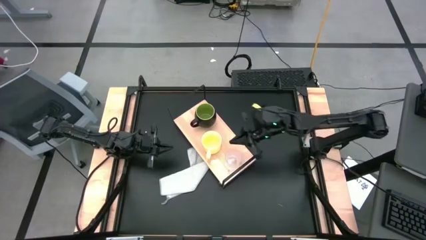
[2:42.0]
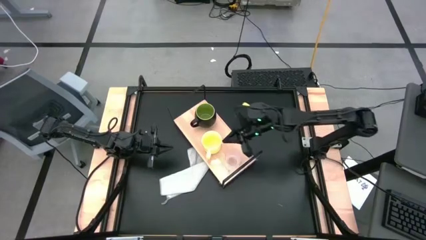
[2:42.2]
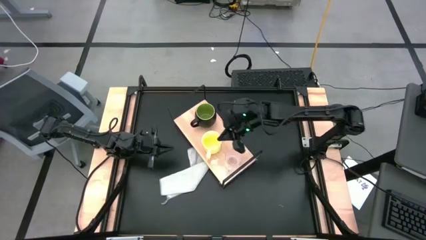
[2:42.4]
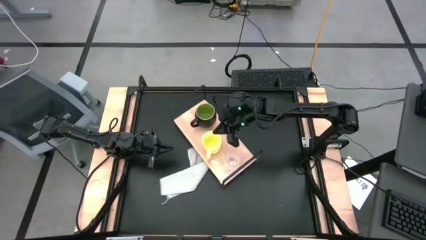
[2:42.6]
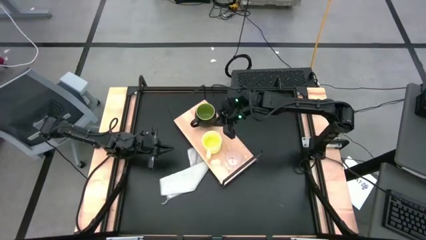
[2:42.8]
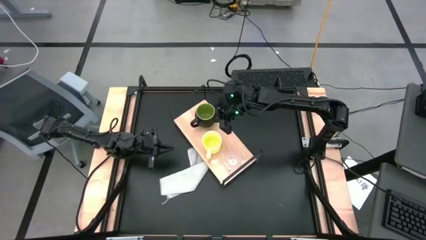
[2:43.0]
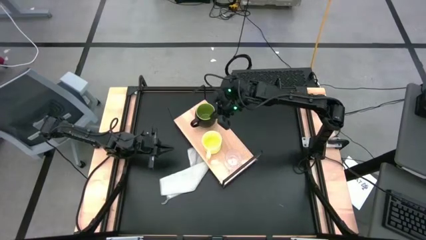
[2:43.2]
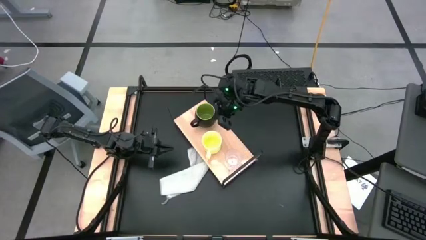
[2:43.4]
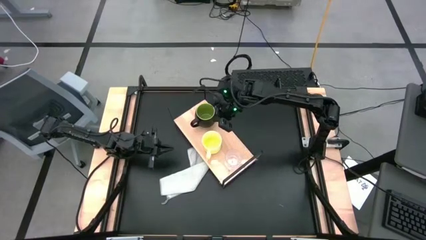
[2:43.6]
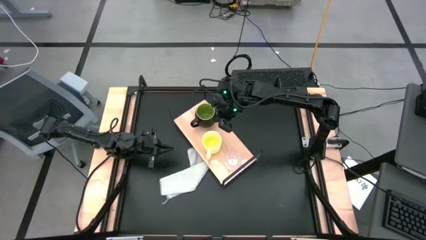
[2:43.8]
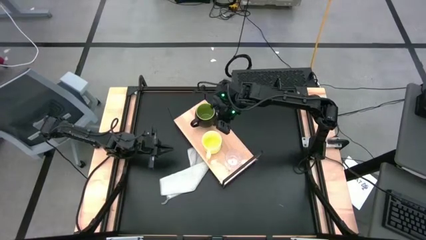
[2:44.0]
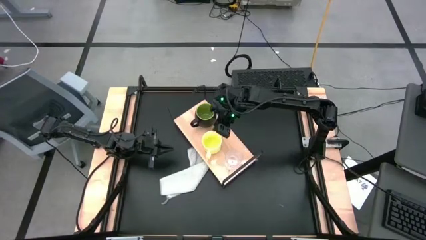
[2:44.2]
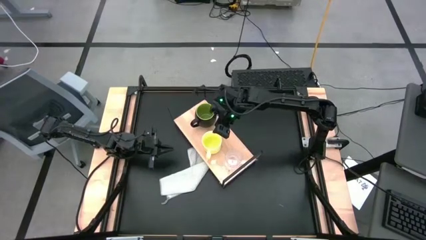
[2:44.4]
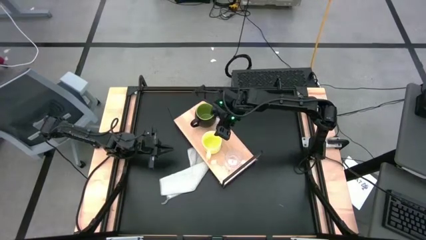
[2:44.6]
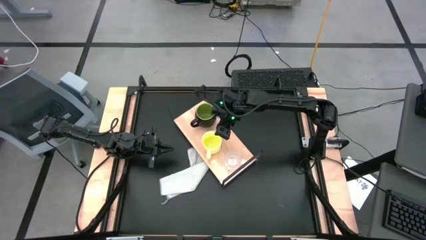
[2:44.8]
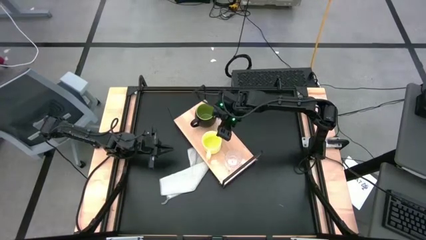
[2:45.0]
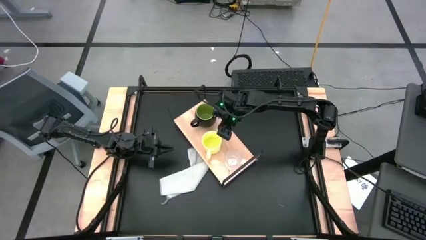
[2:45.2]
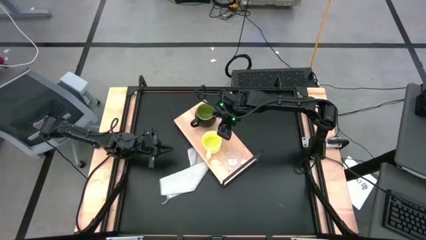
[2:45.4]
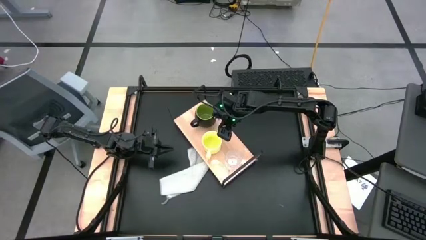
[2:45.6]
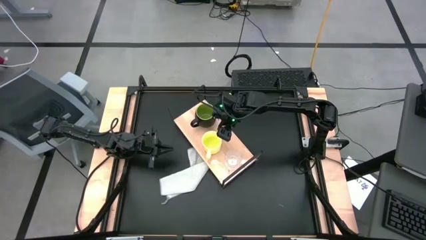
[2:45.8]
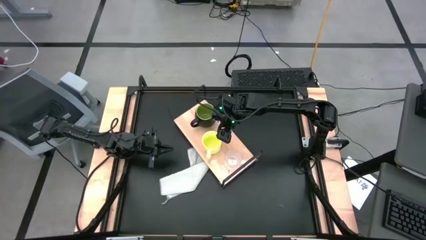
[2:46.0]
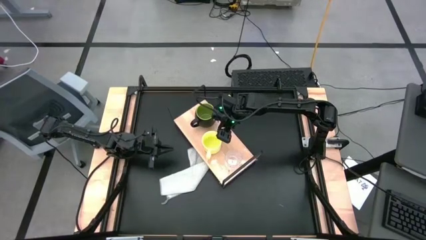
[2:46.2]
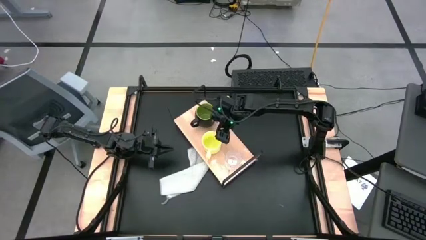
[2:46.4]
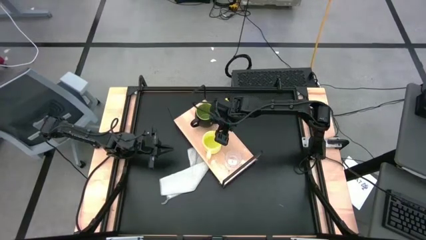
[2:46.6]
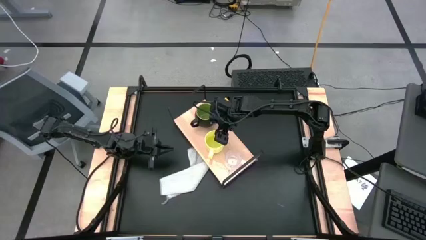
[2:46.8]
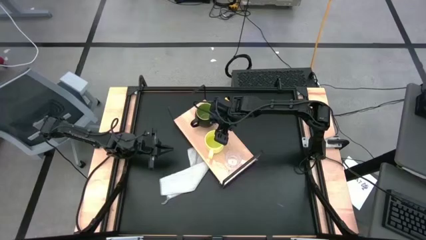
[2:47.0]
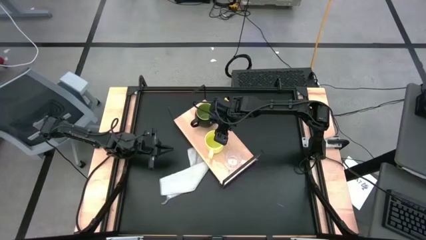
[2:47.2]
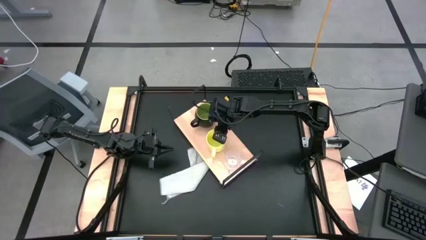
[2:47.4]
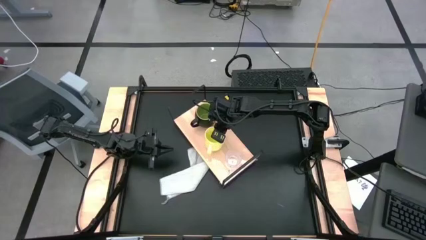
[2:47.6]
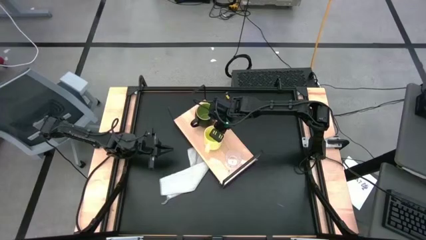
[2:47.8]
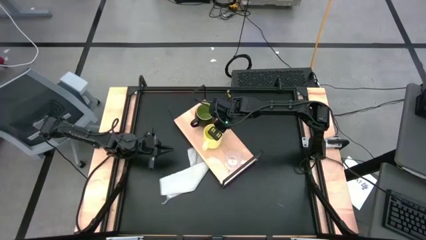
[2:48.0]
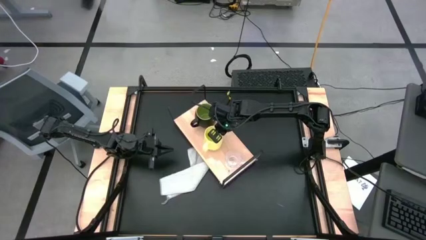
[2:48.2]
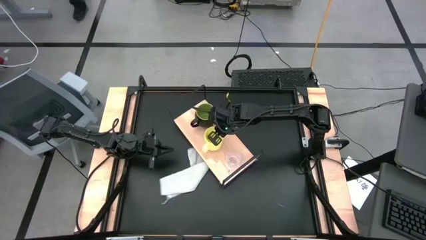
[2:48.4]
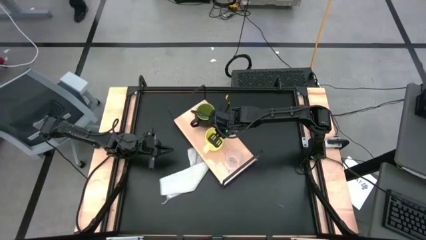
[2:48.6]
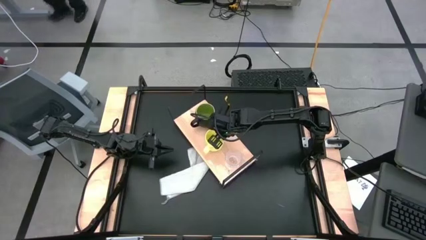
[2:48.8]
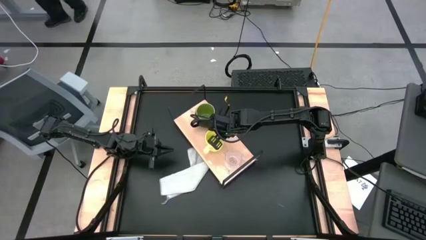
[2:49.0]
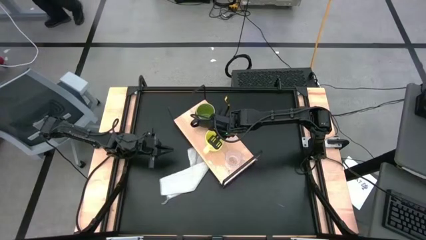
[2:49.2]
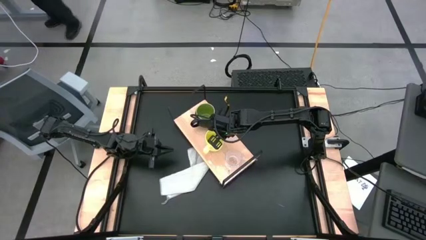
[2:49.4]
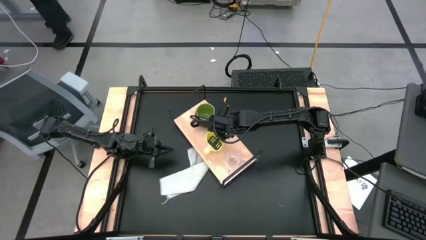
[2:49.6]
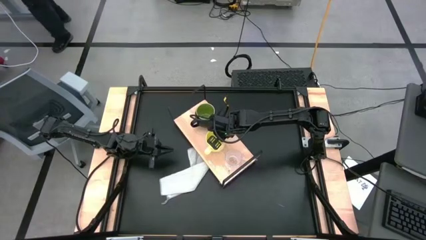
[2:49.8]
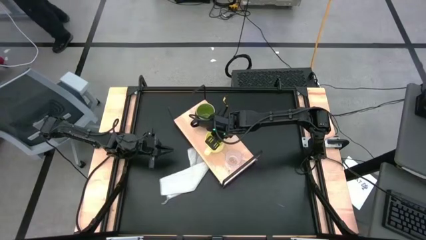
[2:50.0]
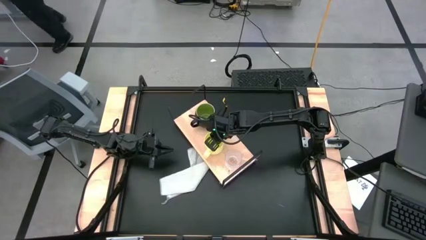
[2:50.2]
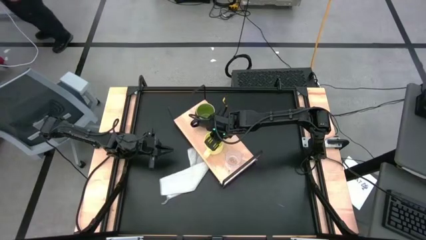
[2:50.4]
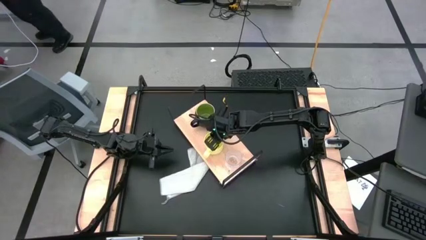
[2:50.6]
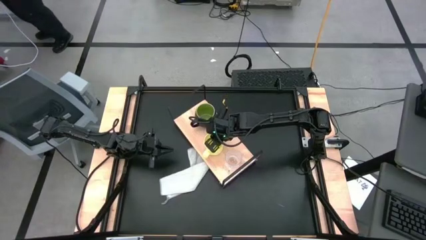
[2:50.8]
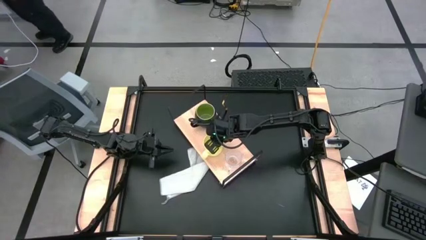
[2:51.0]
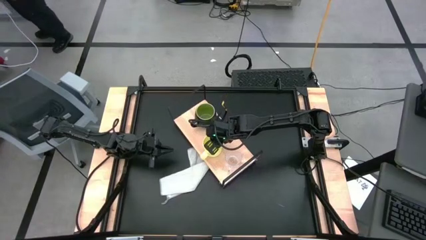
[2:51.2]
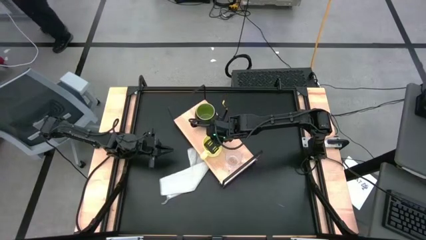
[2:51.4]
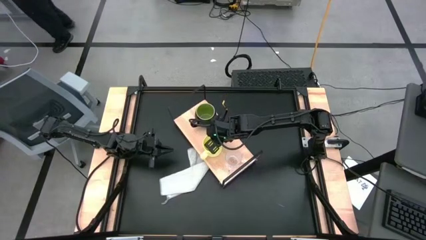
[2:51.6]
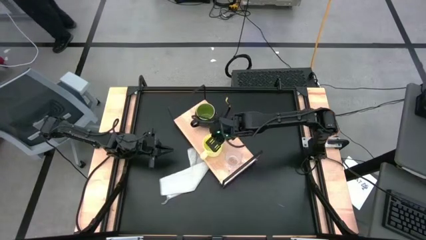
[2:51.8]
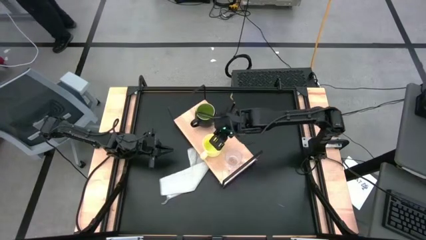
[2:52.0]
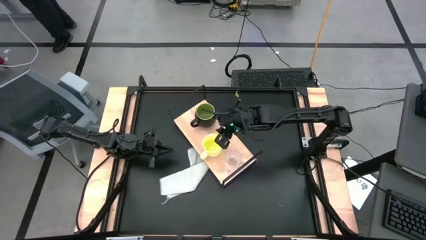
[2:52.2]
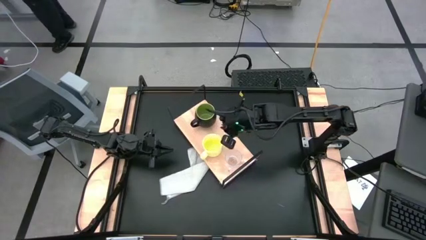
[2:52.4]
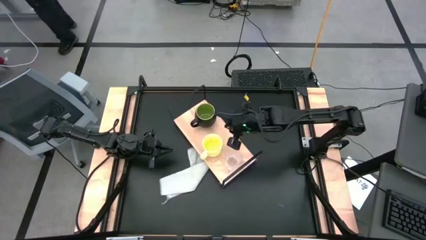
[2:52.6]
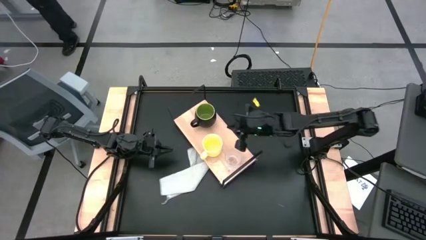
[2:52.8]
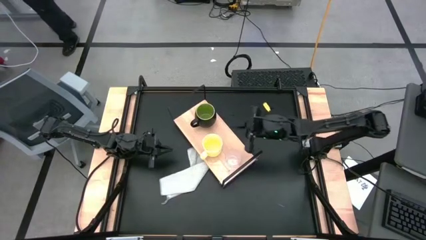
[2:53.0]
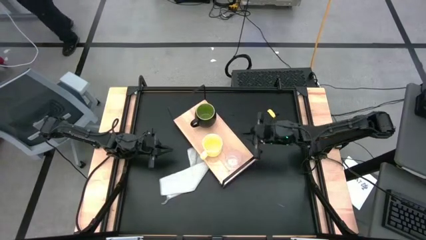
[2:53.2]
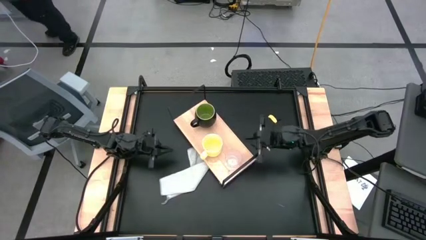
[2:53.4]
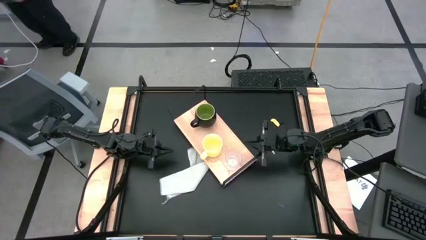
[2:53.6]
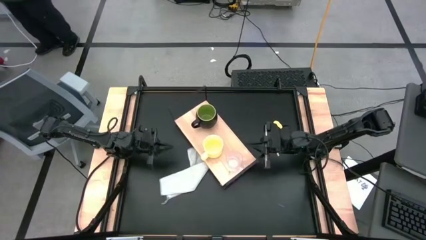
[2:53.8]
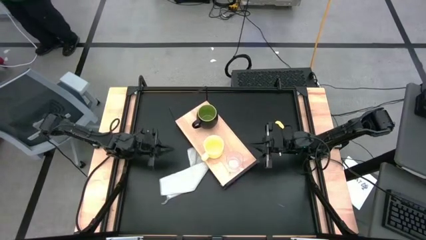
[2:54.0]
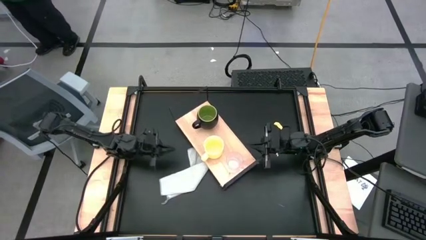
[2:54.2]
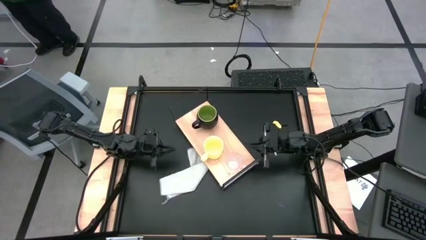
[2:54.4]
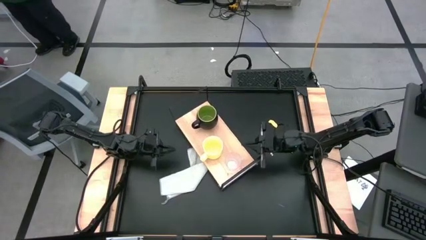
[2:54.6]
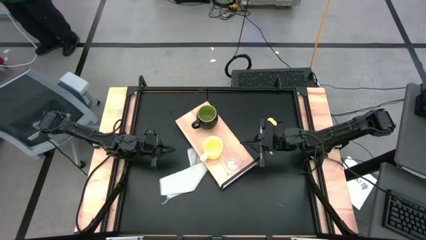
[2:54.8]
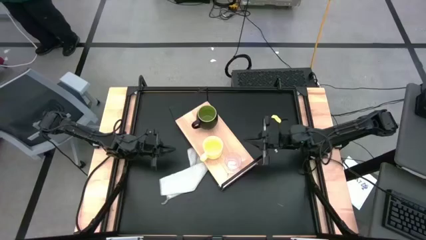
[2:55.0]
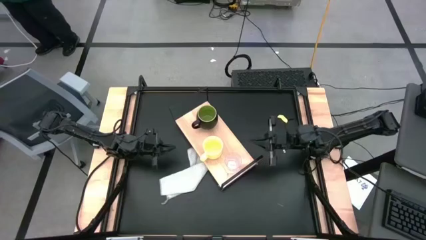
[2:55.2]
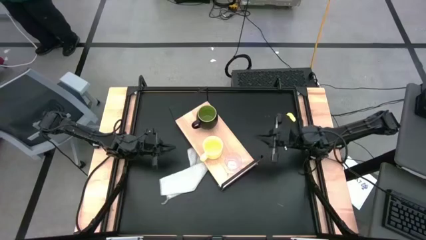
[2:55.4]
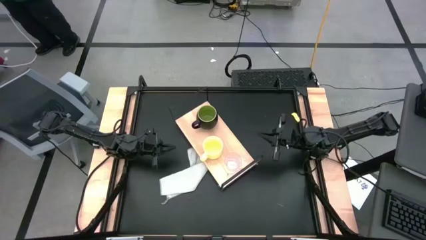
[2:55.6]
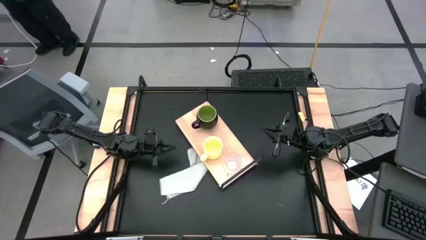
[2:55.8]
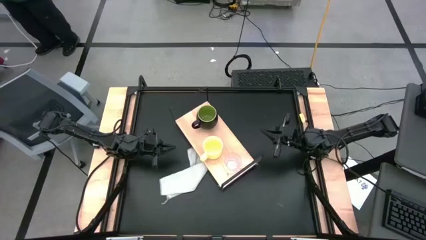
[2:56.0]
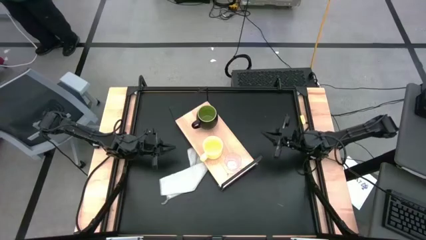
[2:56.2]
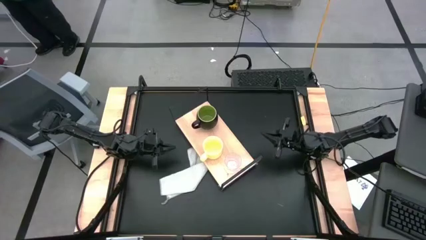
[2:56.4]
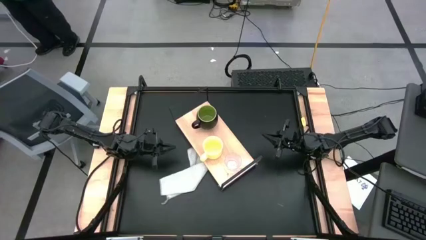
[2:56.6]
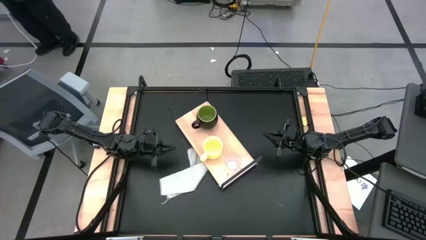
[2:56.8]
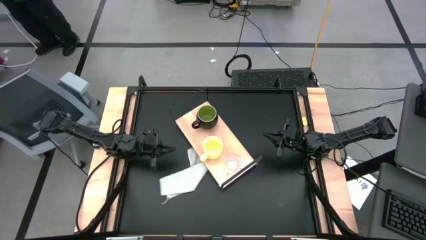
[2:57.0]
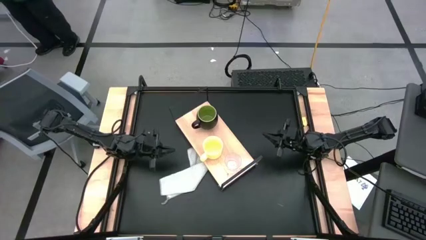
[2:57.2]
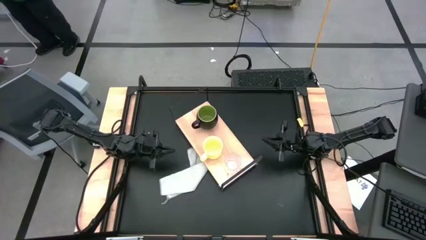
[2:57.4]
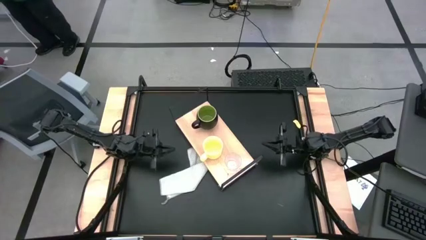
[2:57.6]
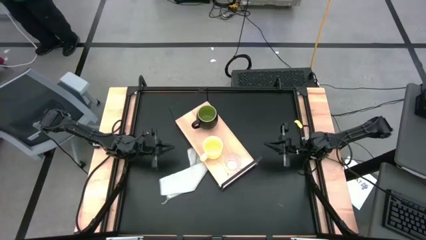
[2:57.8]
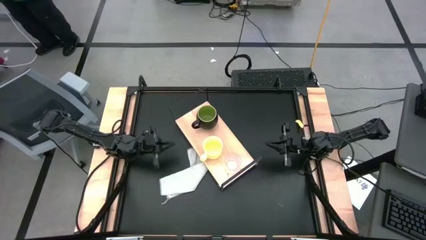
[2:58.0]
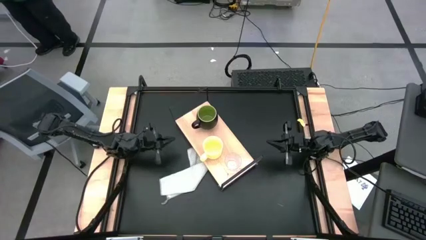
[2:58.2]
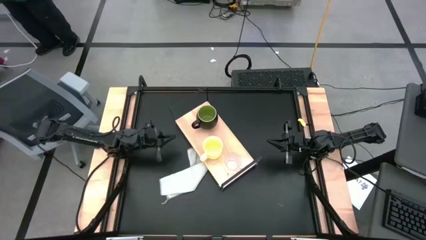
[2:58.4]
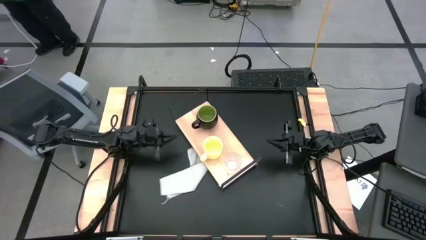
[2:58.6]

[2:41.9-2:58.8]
Task: Stack small to large cups/mugs on shelf
Adjust all the mugs
